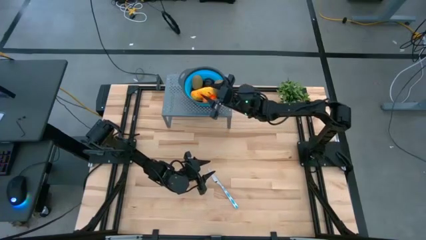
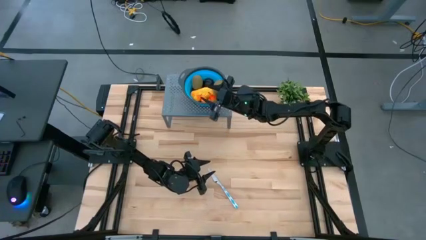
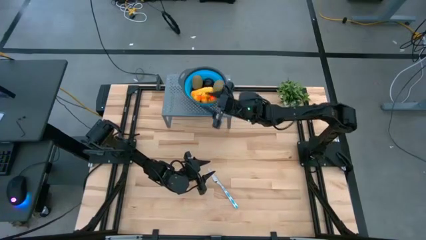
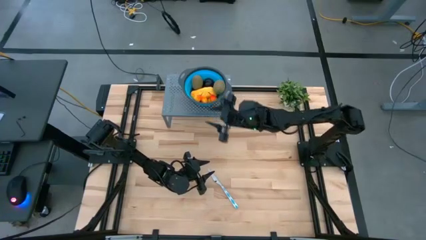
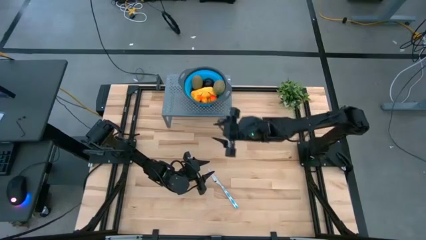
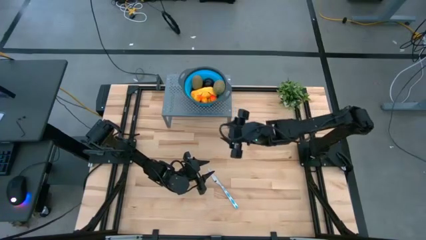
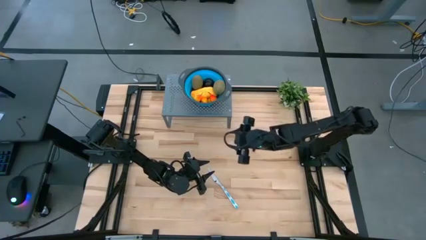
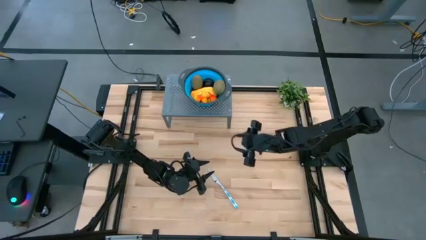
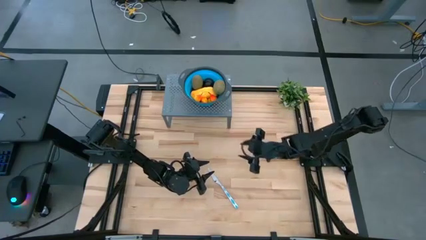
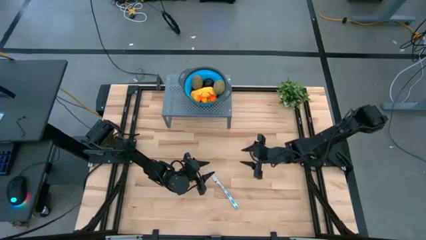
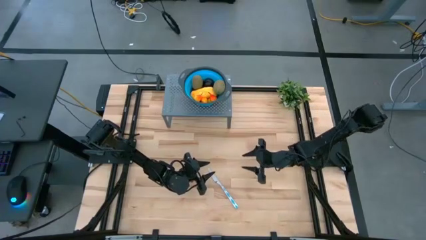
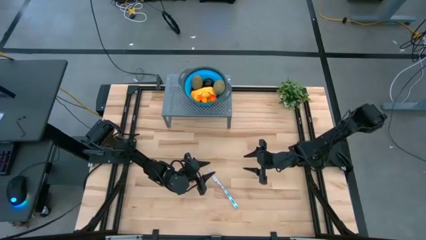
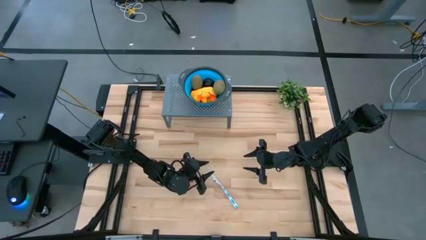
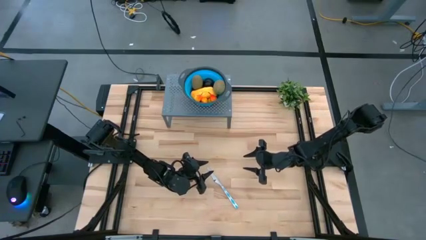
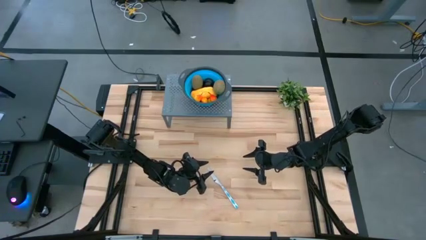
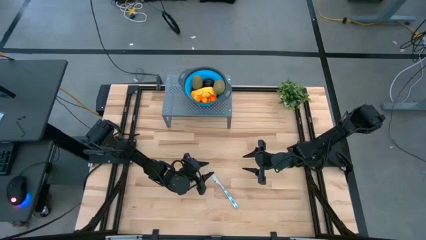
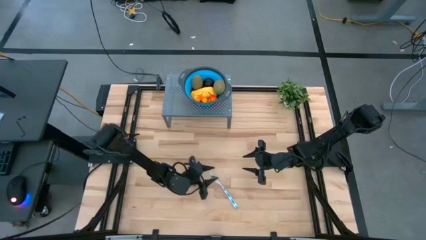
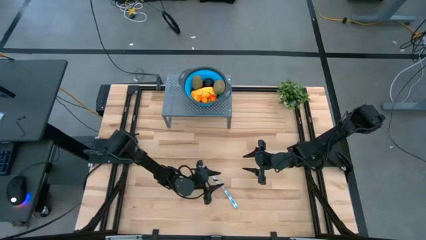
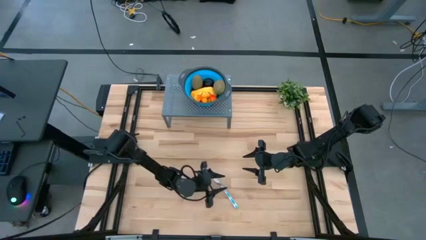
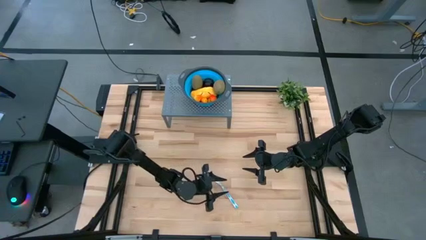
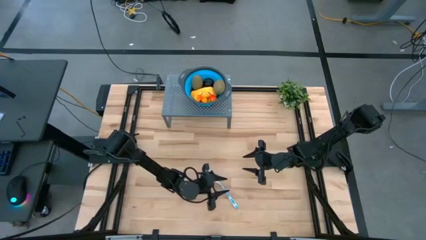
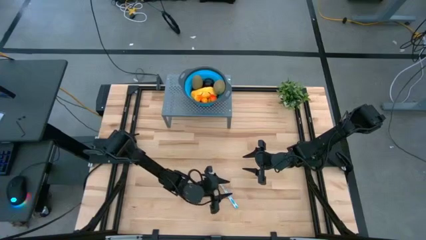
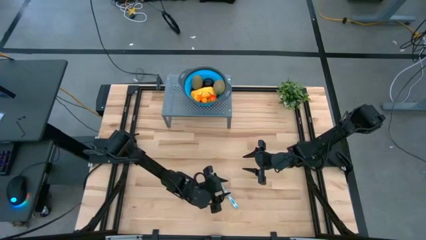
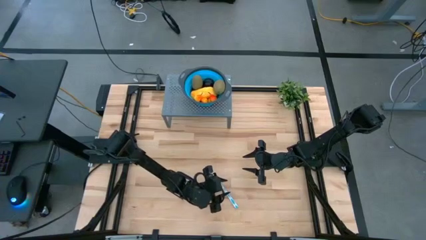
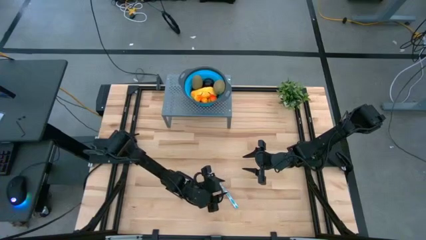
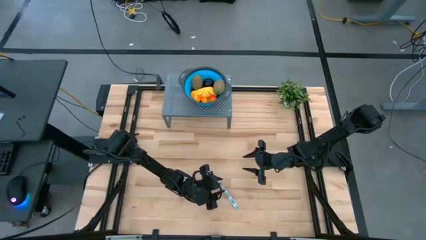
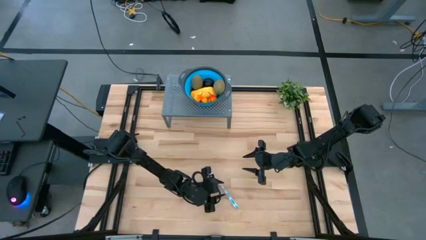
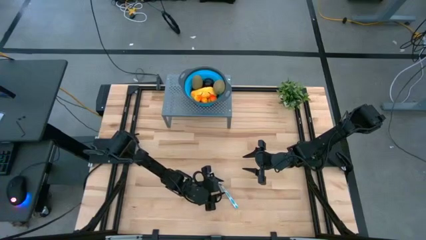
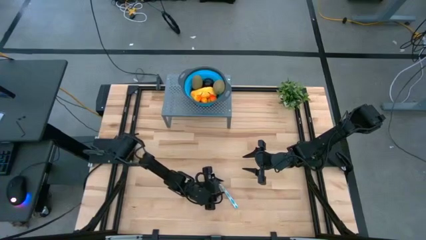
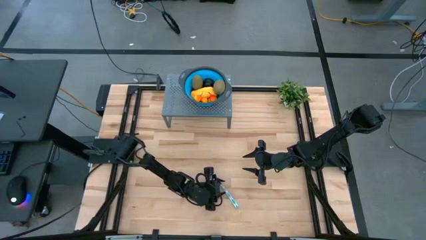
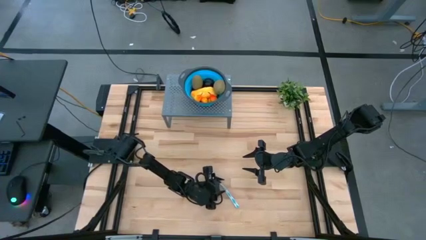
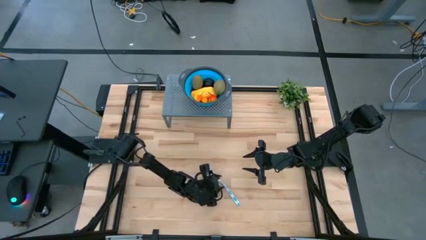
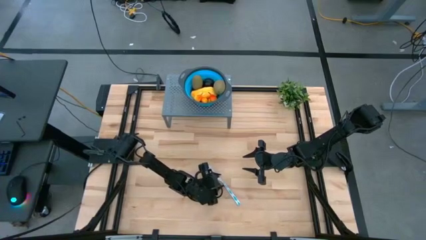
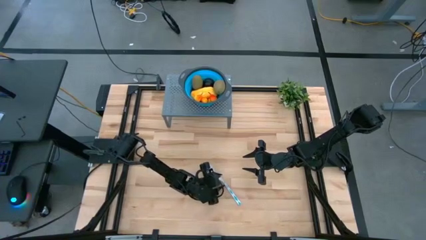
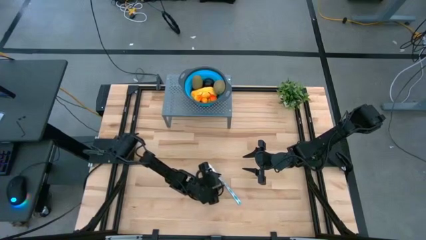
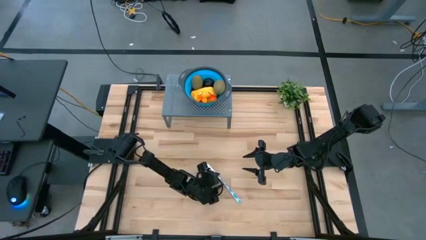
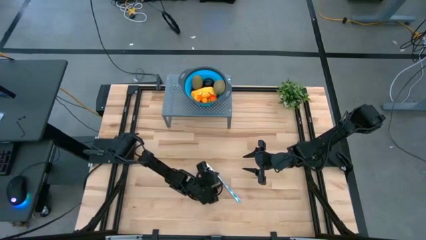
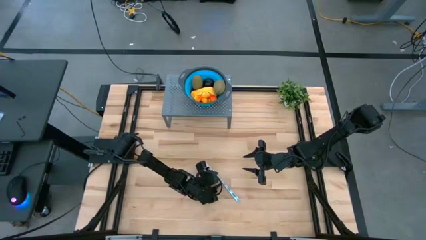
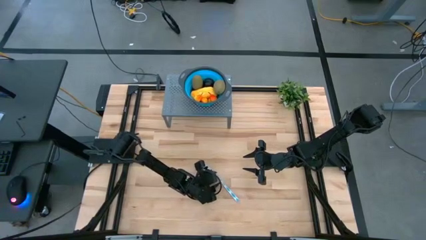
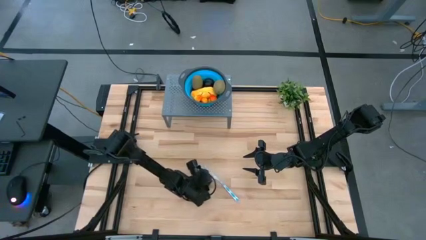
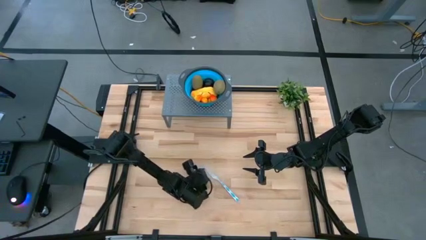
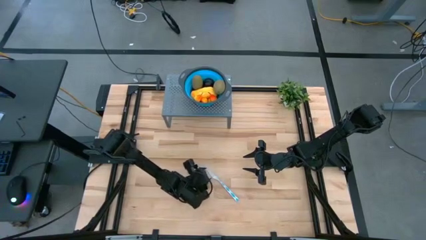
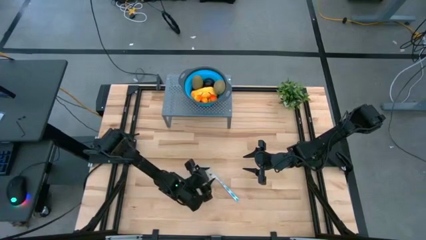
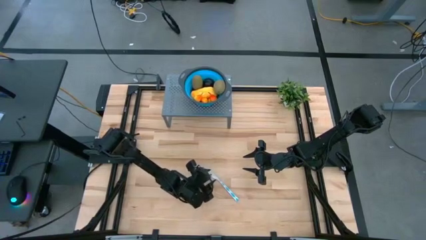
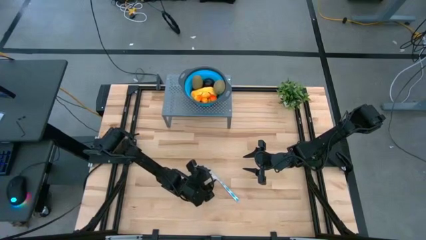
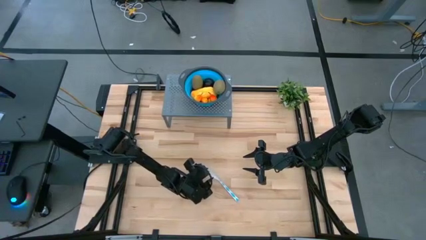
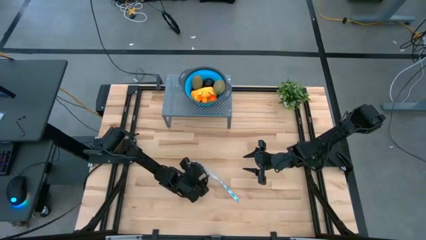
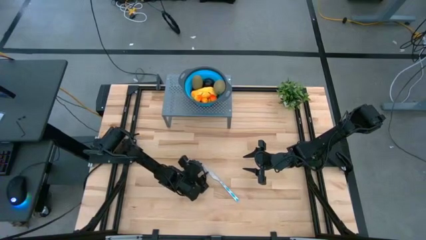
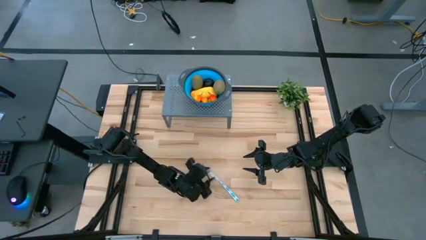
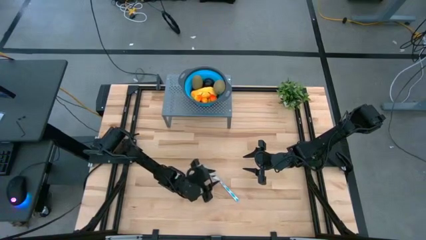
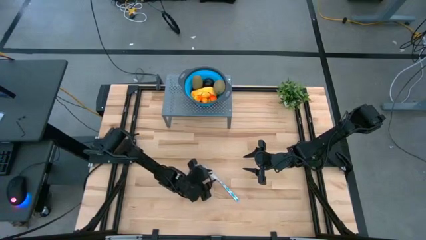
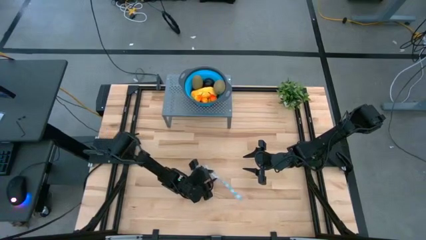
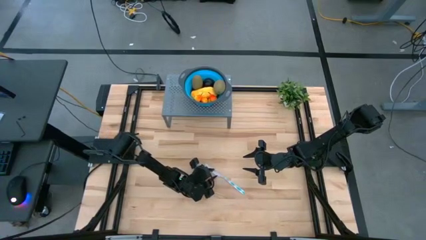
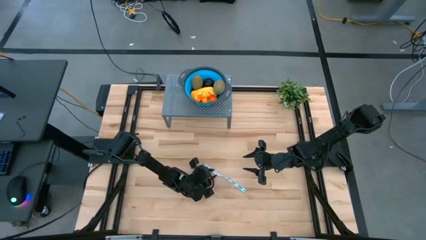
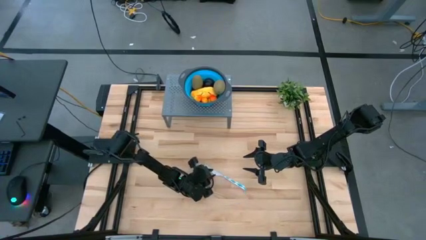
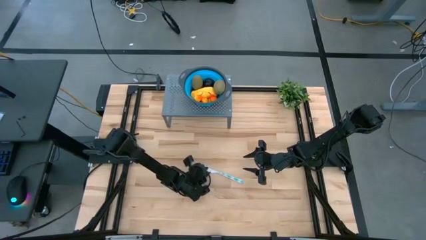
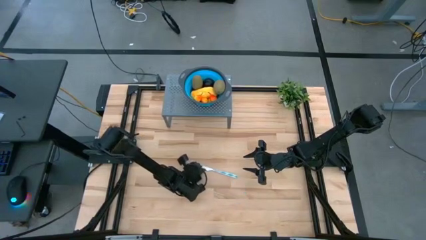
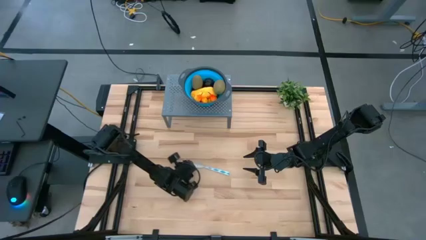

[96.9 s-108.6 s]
Task: Pick & Place Fruit
Put the blue knife on the shelf

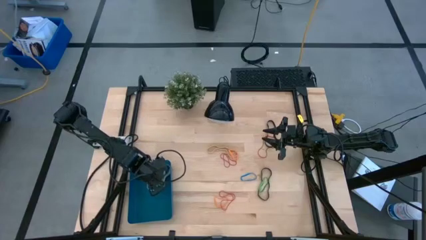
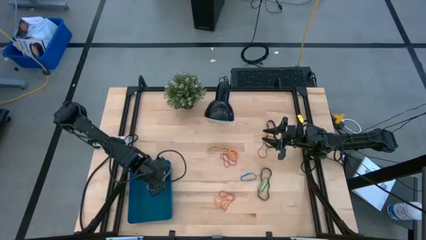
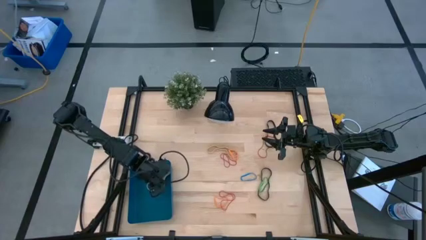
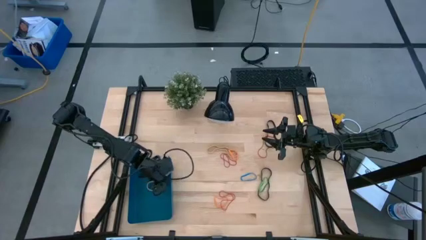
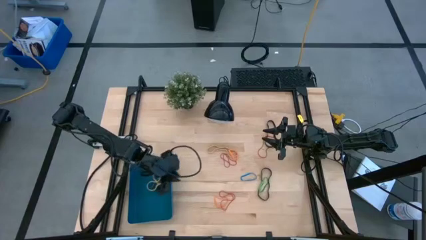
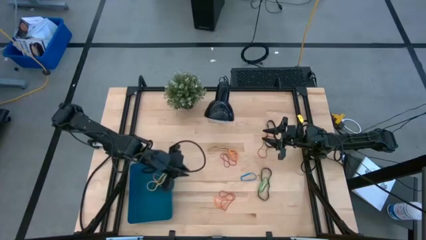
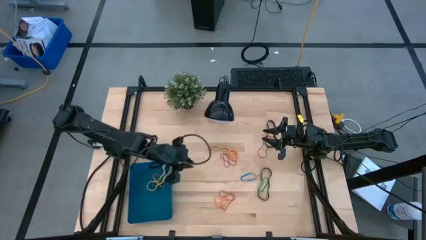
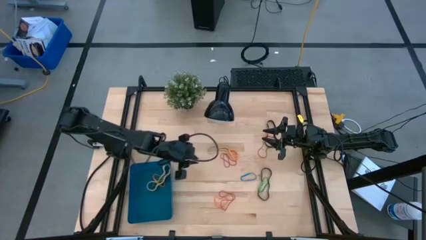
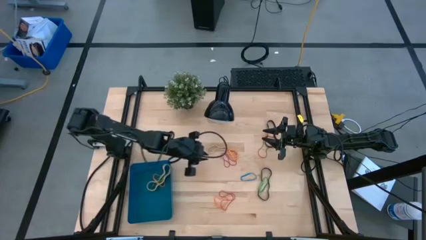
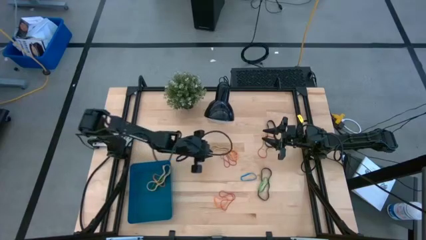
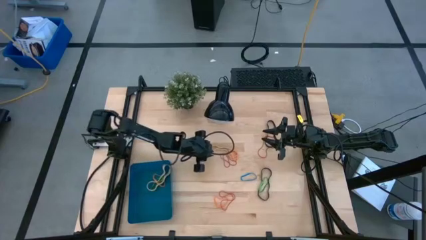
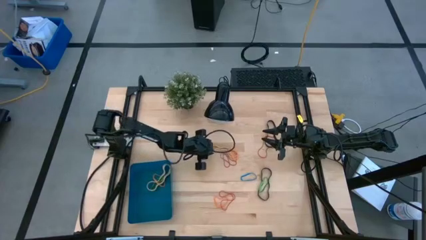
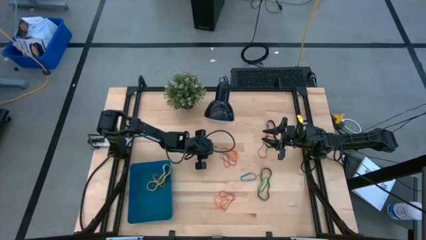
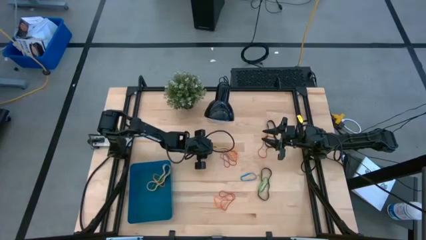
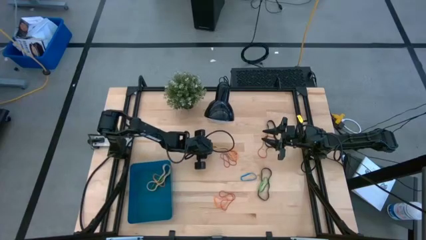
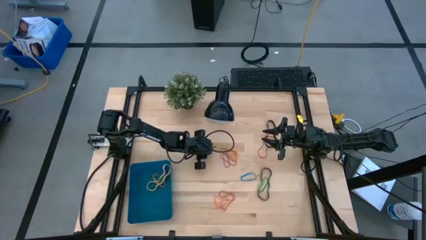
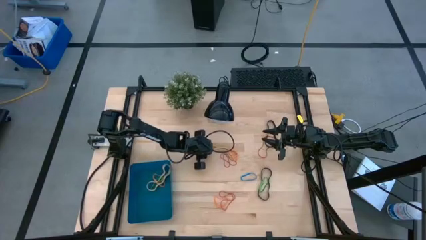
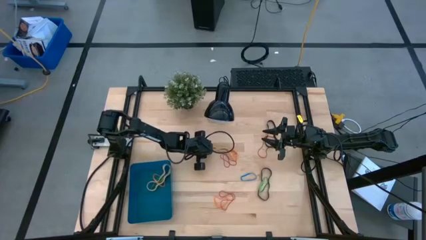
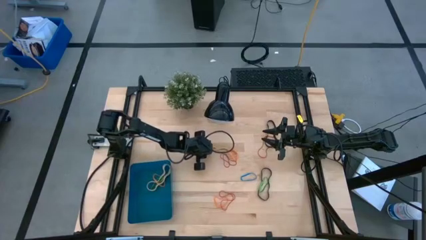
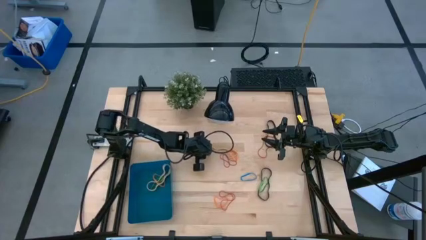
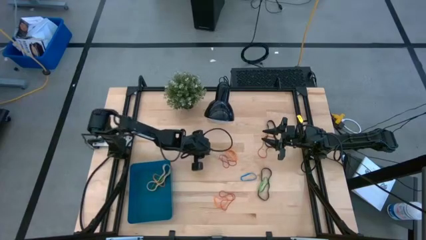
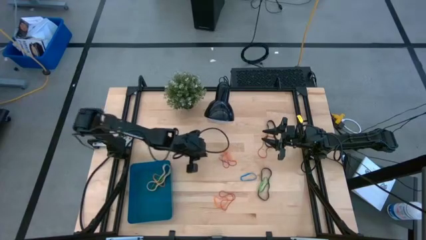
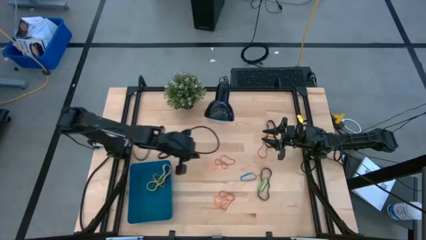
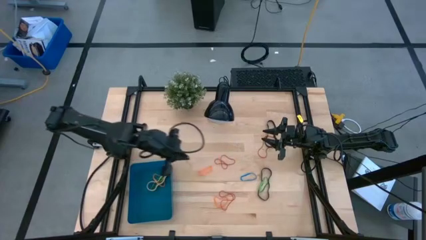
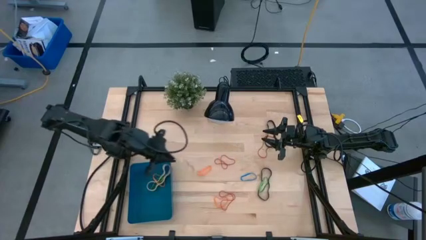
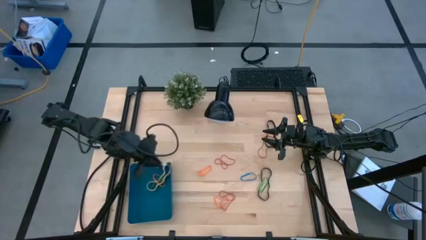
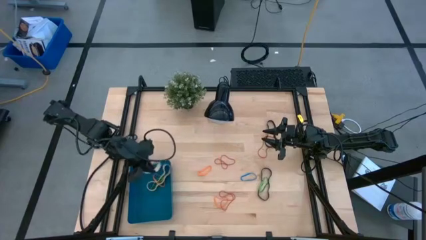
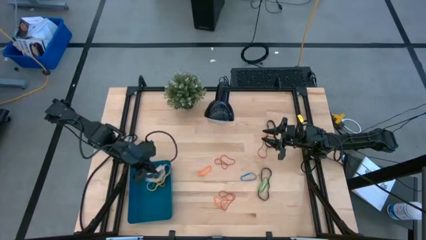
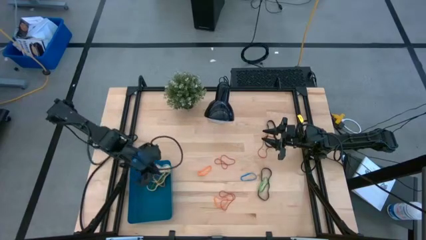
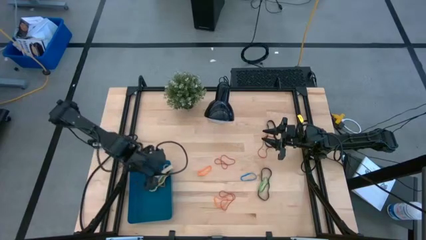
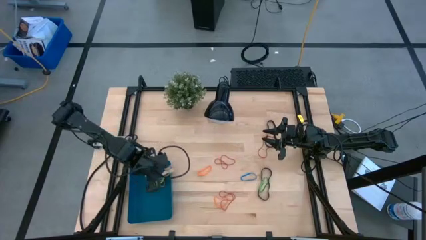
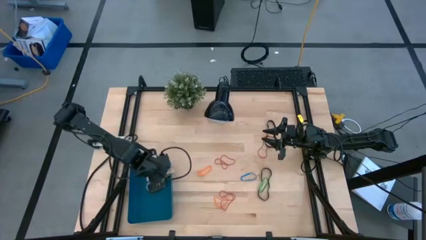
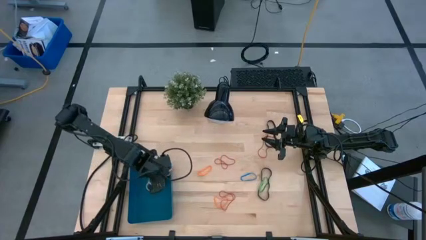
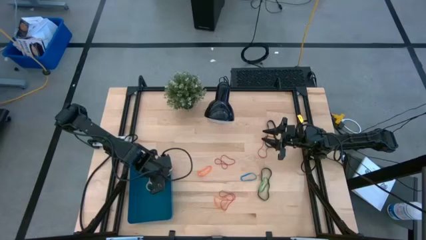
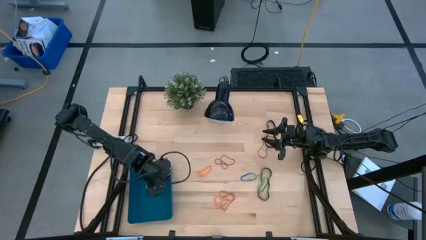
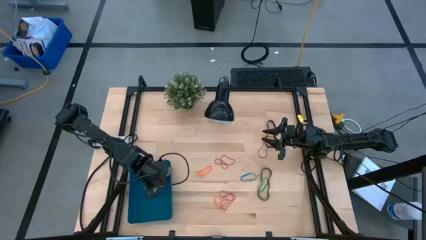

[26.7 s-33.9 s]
Task: Pick and place rubber bands into bin
Put the white rubber band into the blue bin
